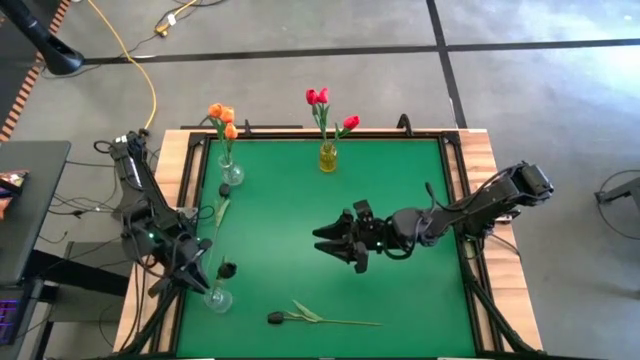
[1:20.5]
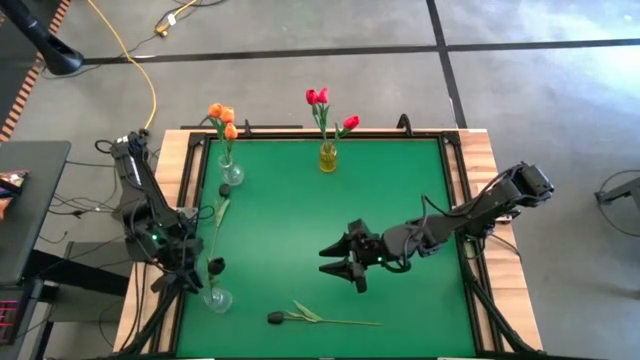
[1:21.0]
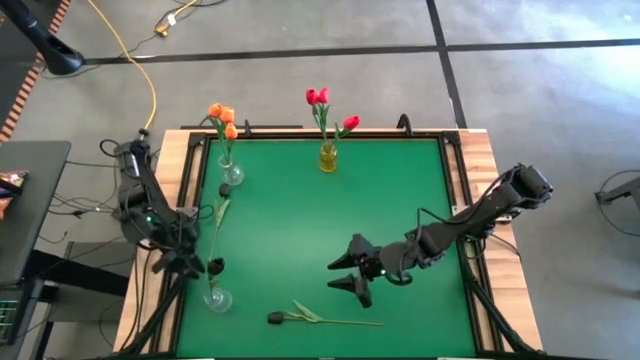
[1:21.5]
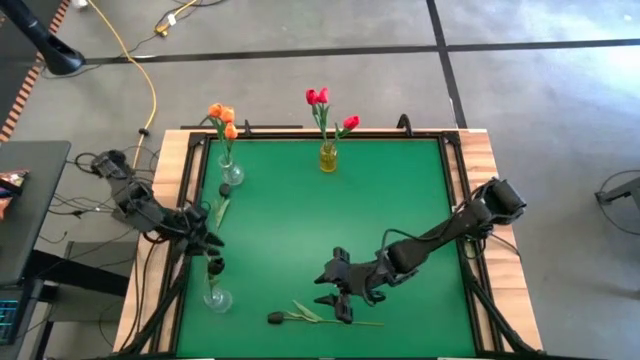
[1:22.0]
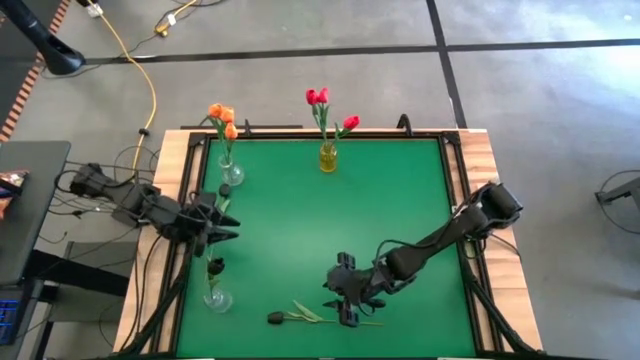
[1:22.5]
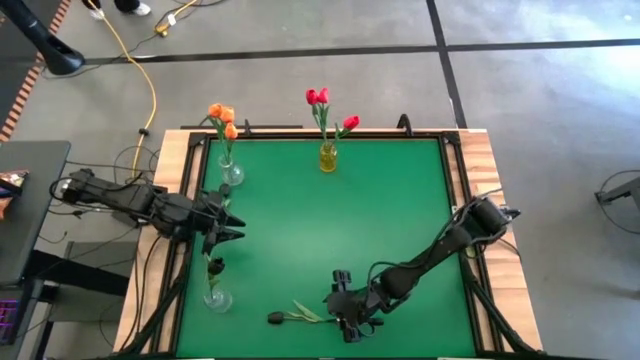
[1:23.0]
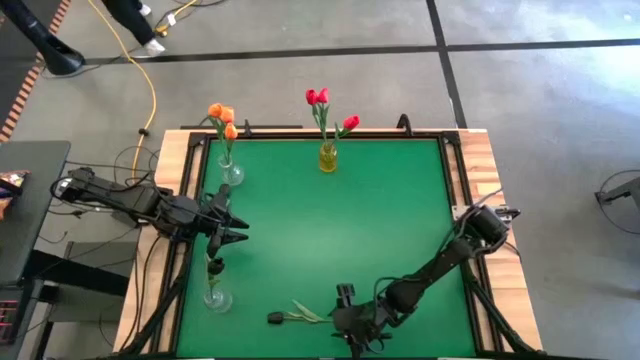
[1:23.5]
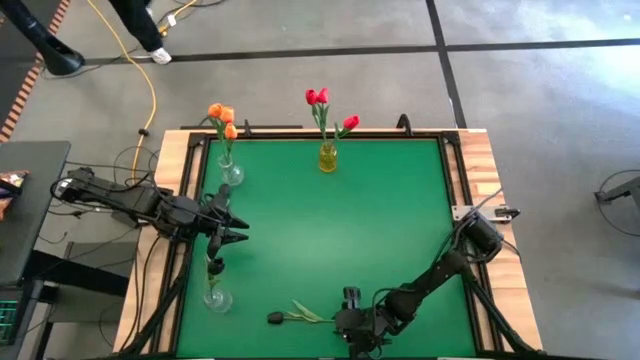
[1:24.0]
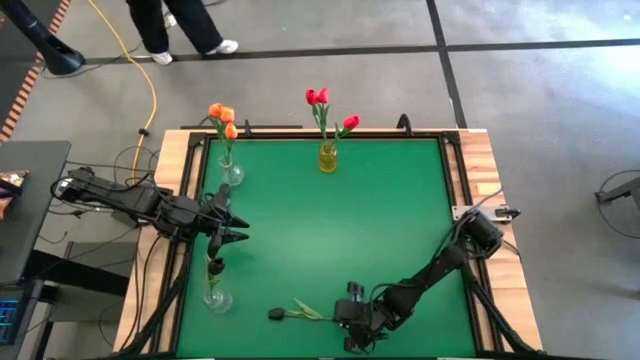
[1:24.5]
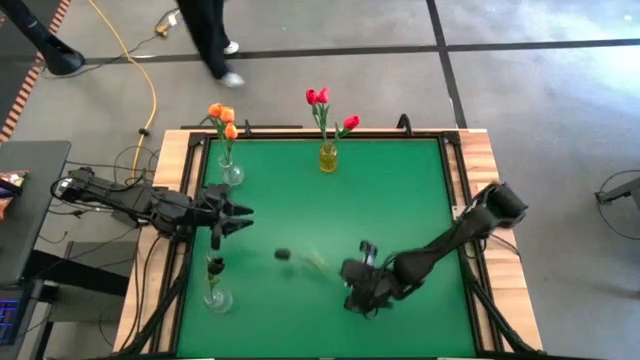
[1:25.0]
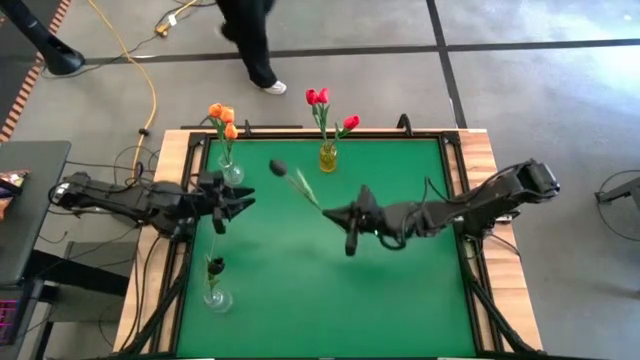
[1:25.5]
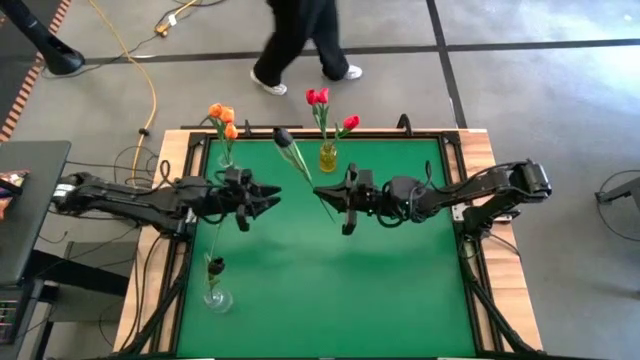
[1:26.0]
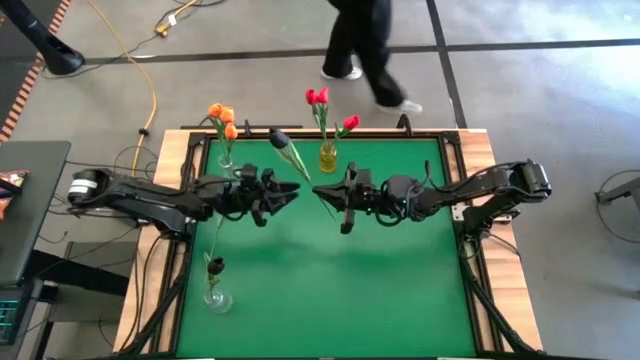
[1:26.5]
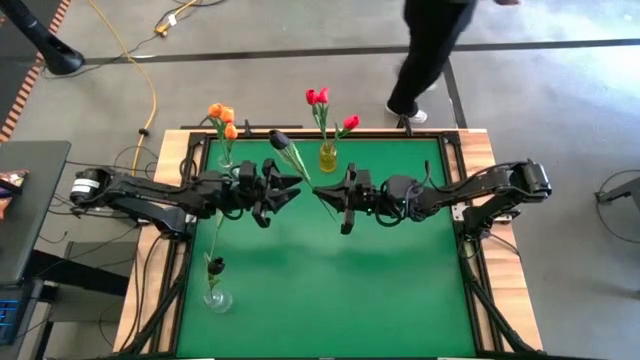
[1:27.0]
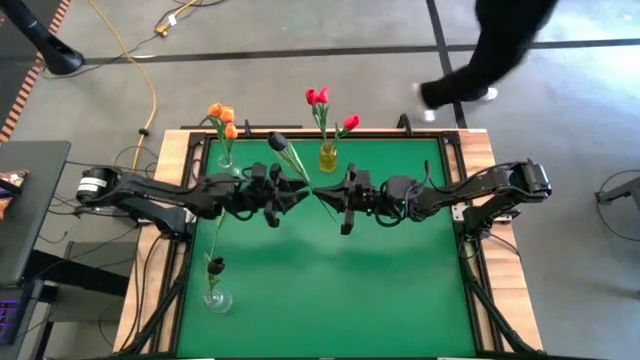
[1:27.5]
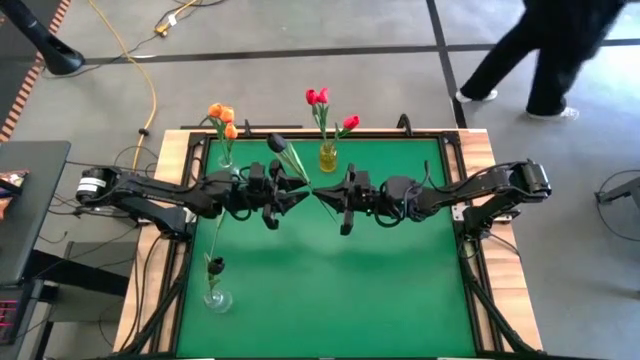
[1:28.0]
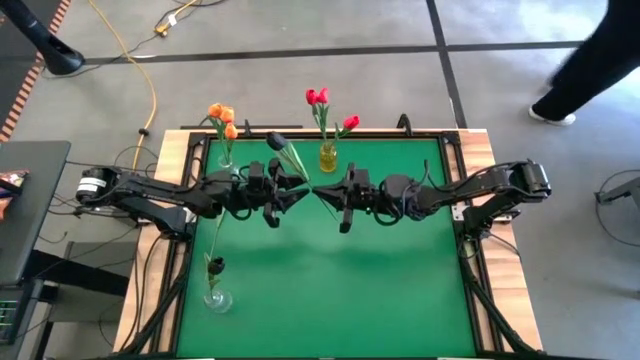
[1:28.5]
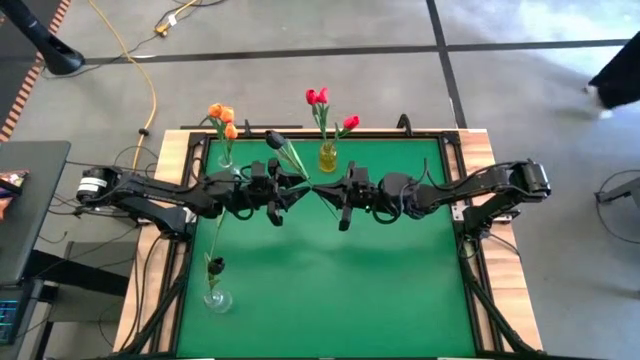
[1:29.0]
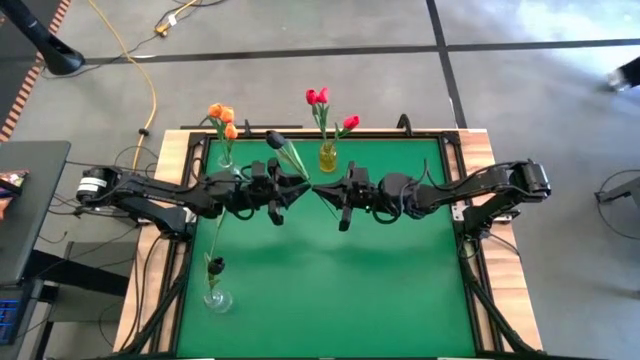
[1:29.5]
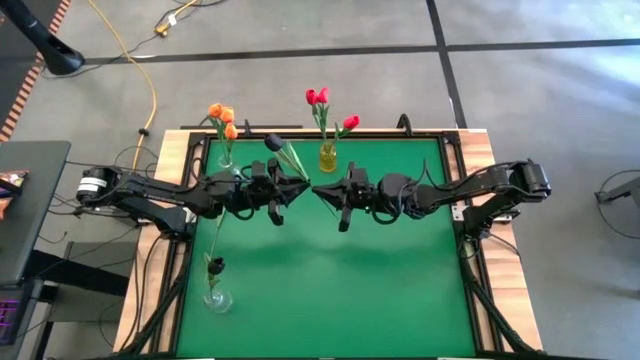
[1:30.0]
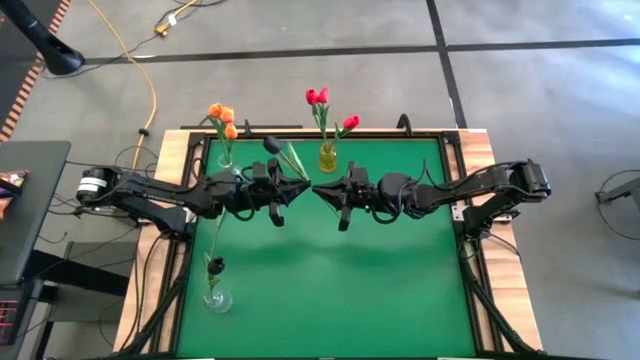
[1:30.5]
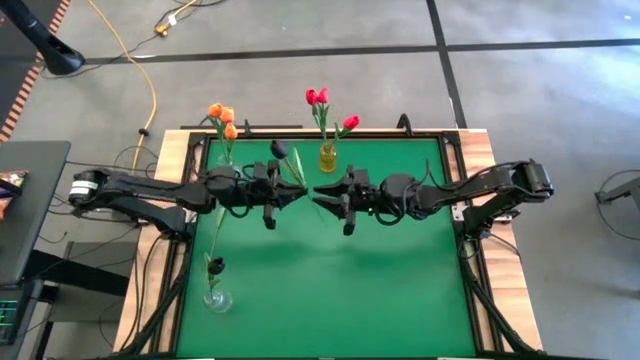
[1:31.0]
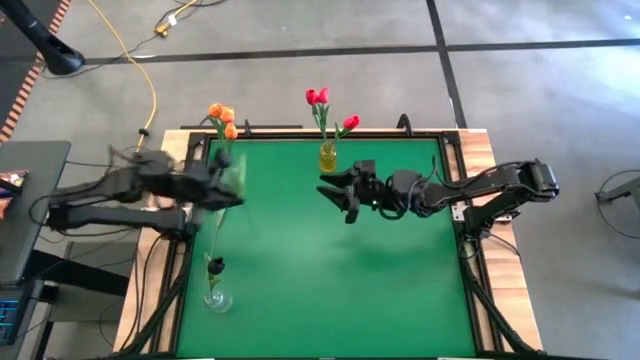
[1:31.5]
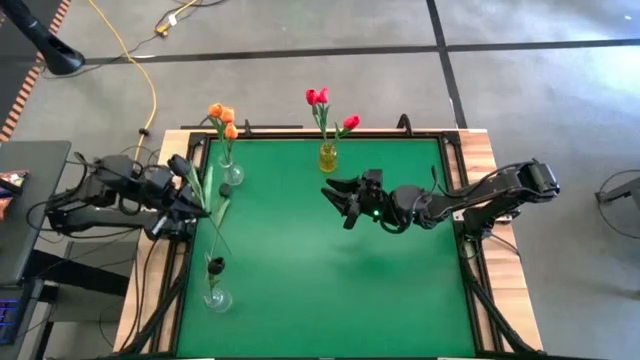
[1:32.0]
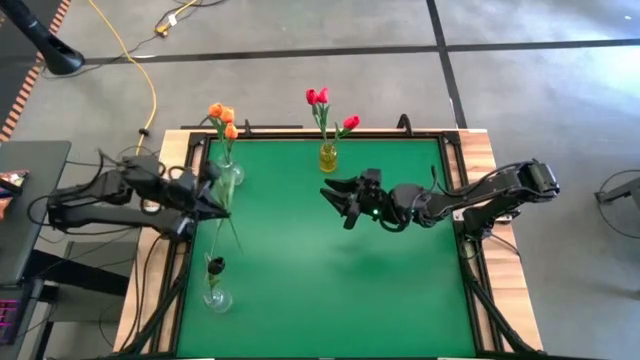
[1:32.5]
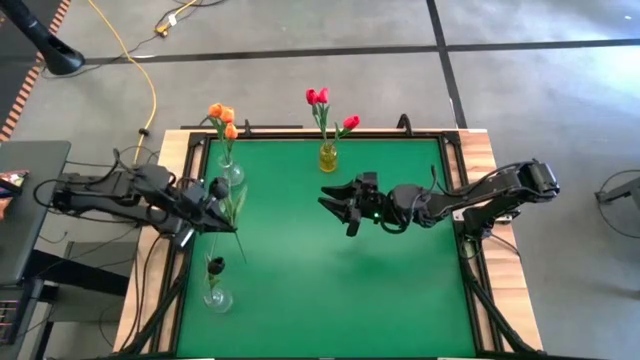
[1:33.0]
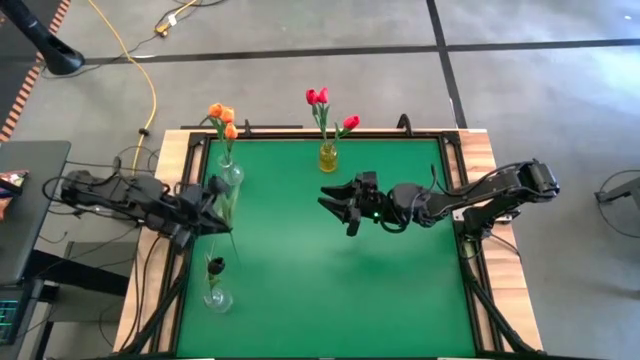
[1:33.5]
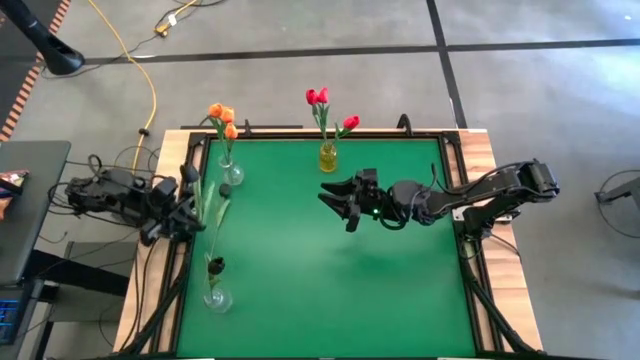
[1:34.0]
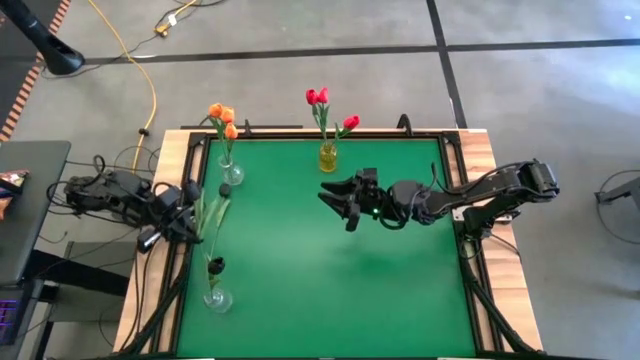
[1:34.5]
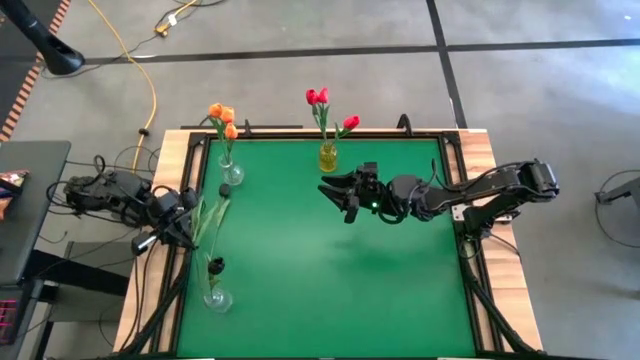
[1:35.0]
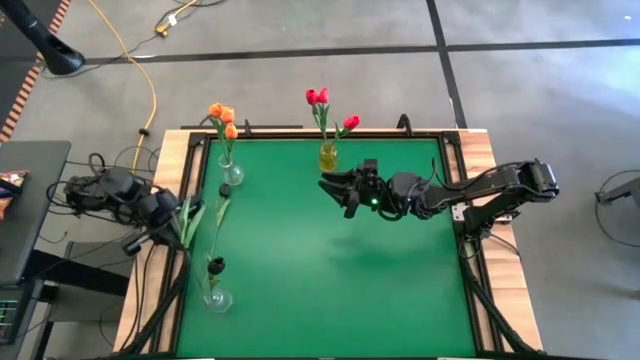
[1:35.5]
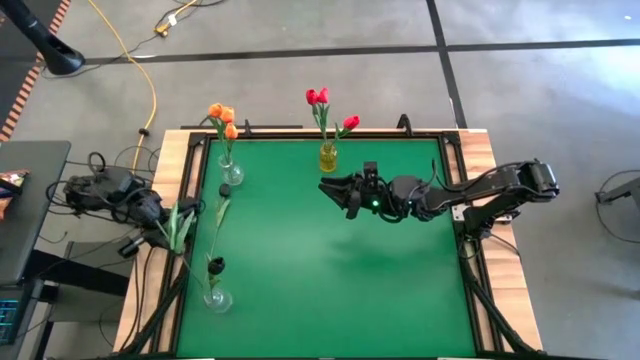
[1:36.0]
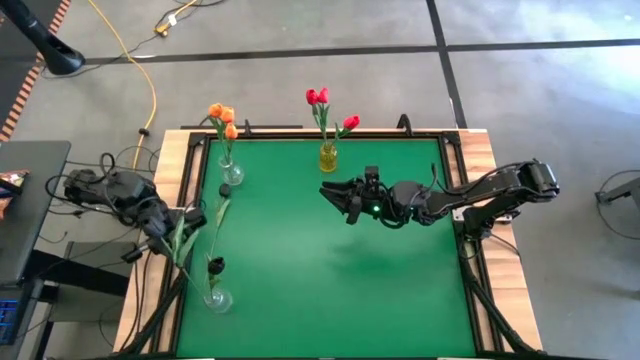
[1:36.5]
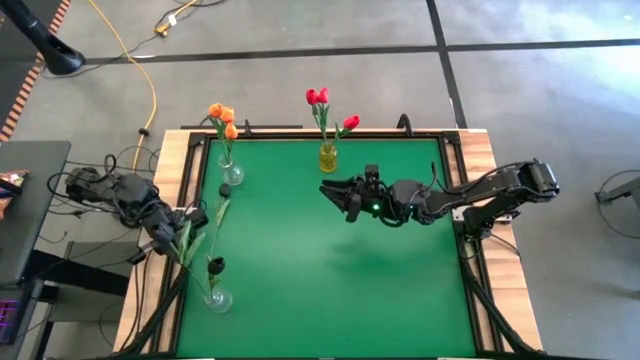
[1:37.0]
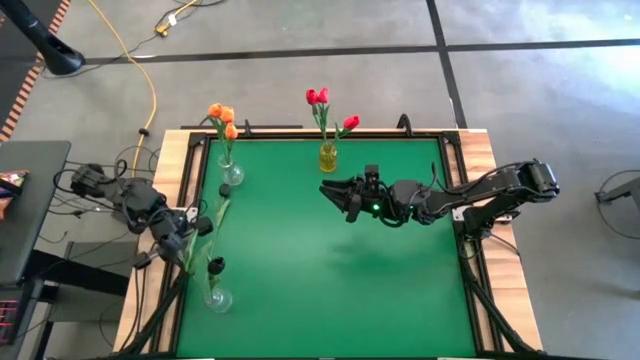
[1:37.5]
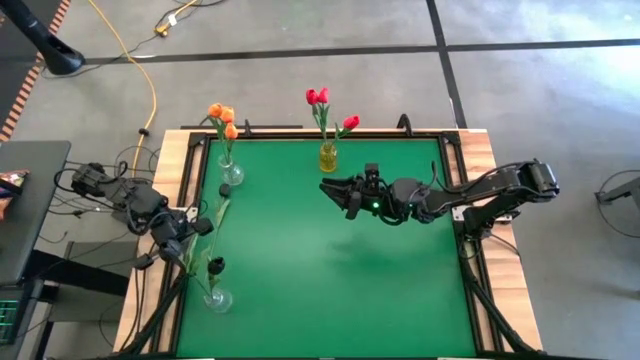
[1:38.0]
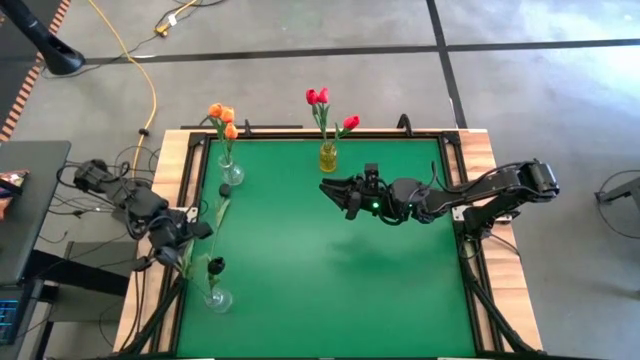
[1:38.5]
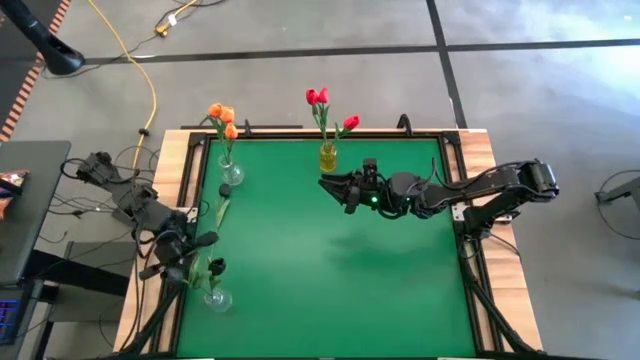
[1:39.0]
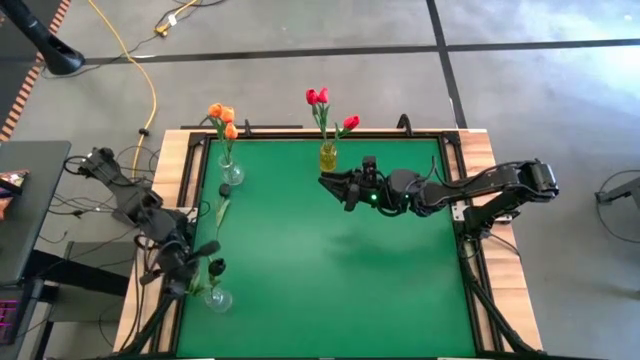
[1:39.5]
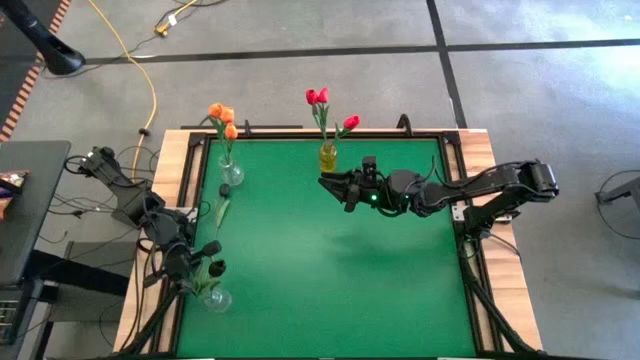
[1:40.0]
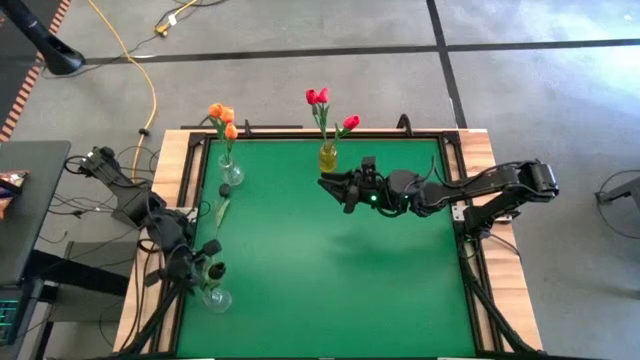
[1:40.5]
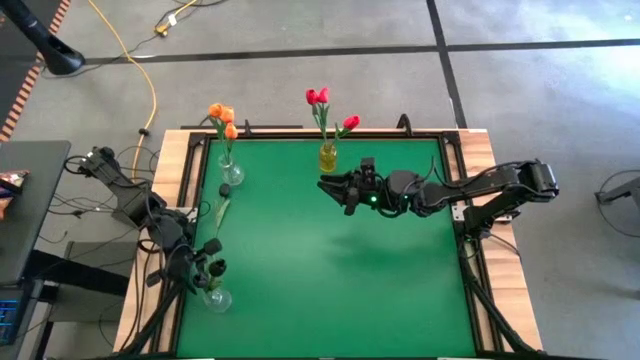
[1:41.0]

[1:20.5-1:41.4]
Task: Sort flowers into vase by color
Put the bottom black flower into the bottom transparent vase
